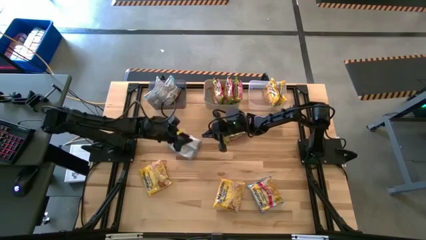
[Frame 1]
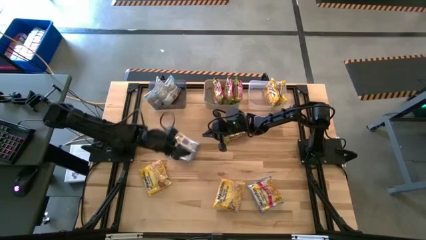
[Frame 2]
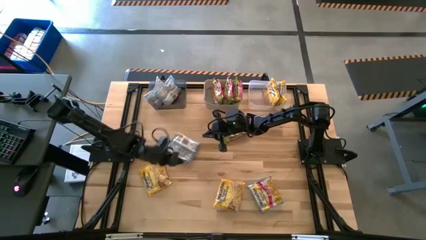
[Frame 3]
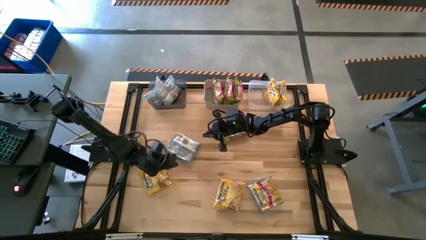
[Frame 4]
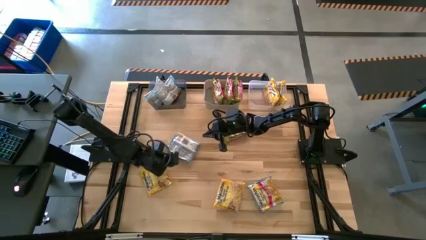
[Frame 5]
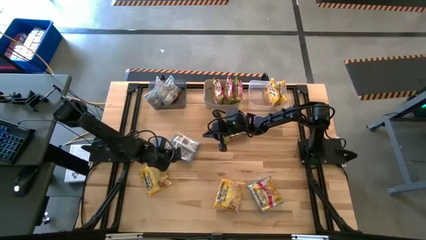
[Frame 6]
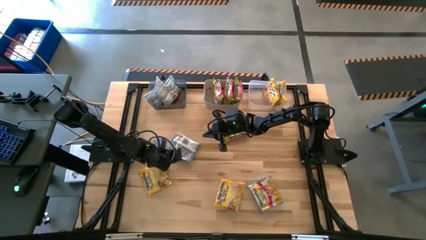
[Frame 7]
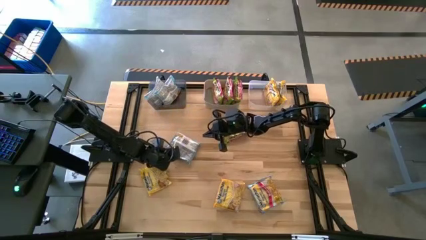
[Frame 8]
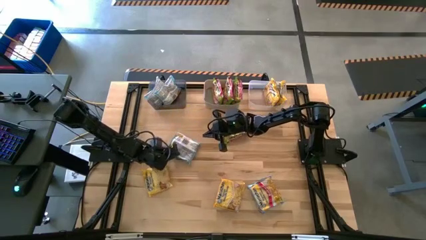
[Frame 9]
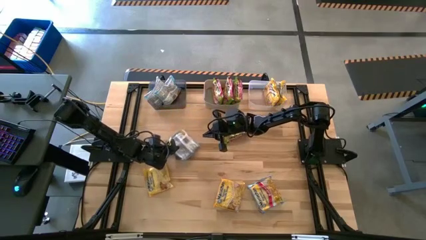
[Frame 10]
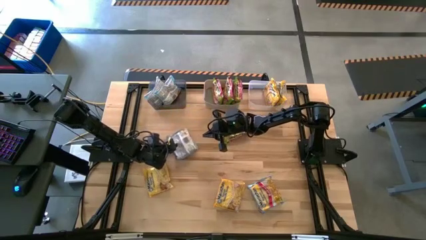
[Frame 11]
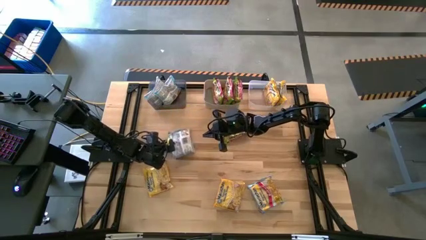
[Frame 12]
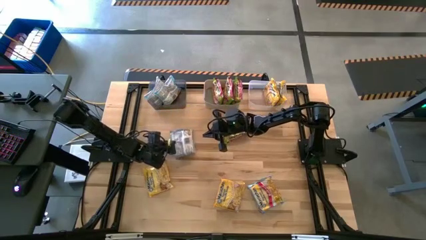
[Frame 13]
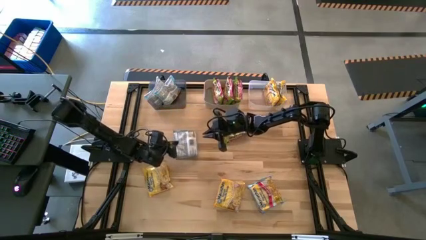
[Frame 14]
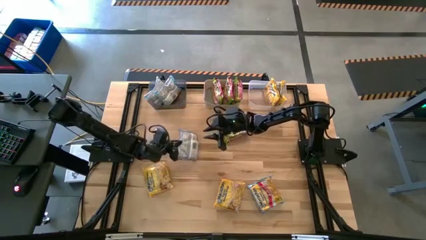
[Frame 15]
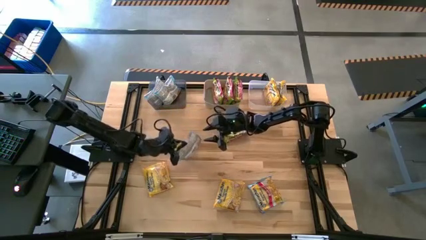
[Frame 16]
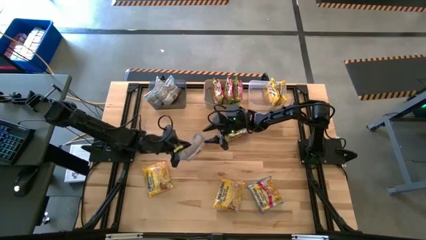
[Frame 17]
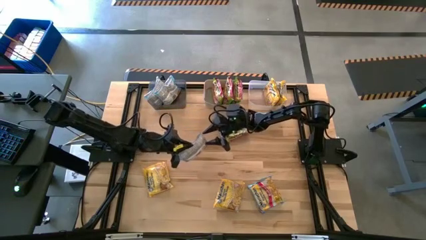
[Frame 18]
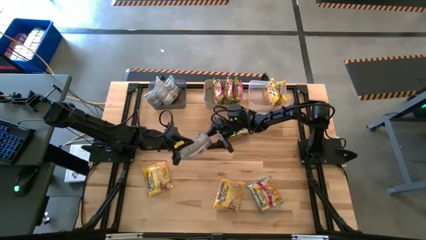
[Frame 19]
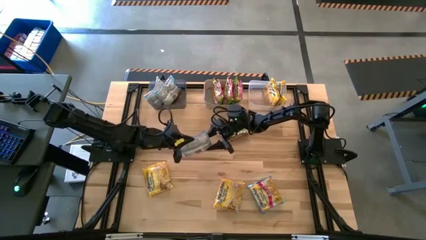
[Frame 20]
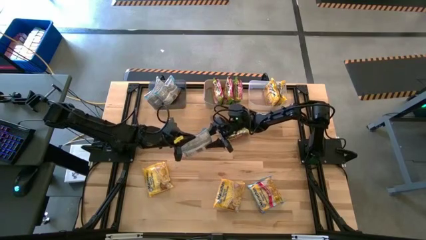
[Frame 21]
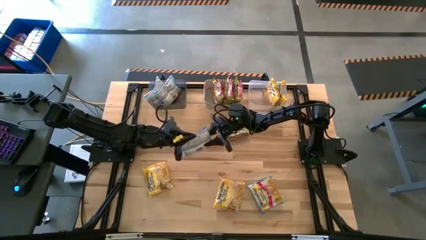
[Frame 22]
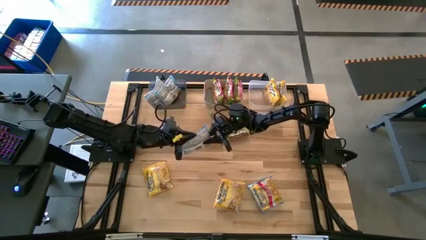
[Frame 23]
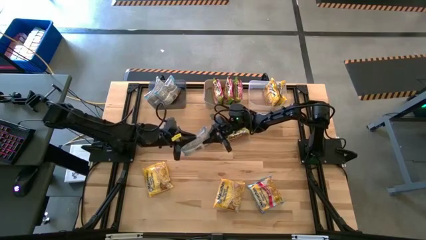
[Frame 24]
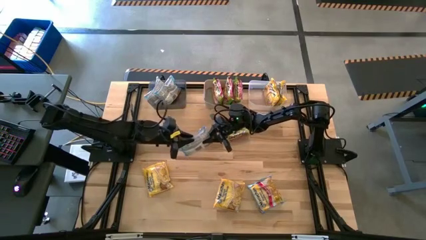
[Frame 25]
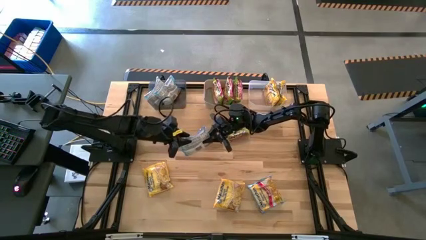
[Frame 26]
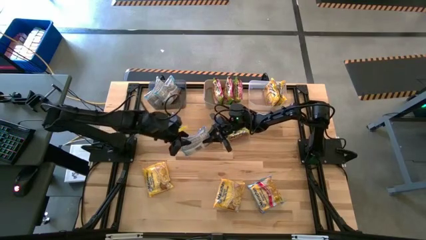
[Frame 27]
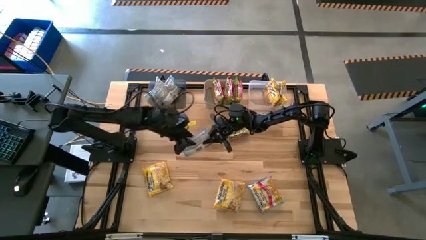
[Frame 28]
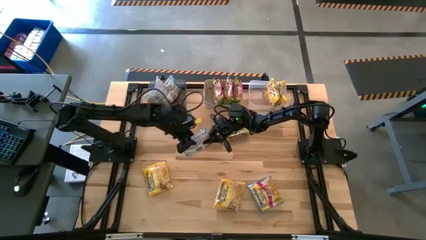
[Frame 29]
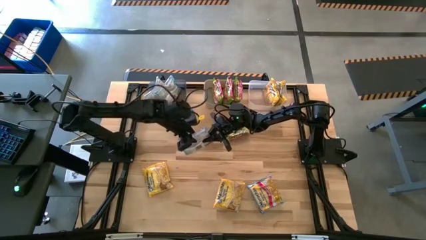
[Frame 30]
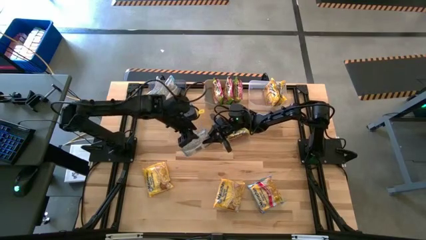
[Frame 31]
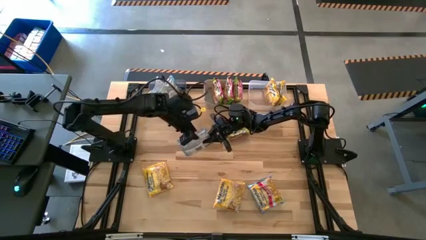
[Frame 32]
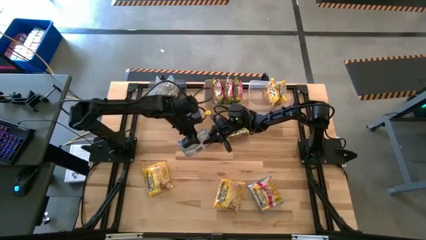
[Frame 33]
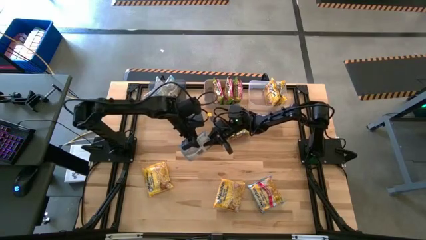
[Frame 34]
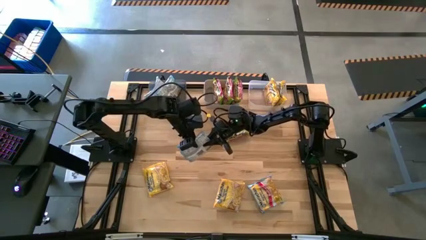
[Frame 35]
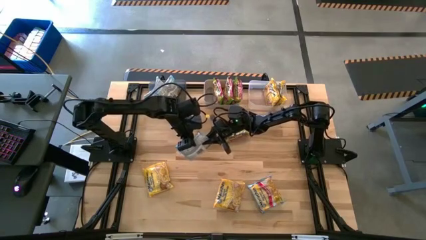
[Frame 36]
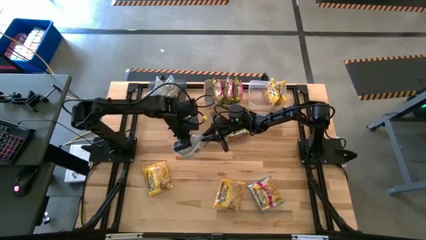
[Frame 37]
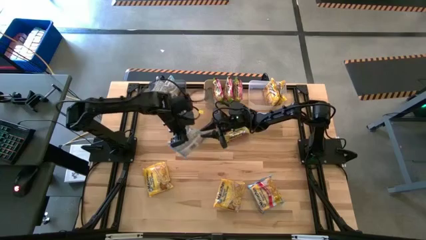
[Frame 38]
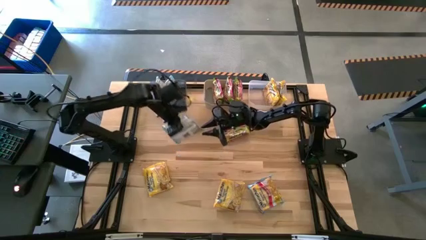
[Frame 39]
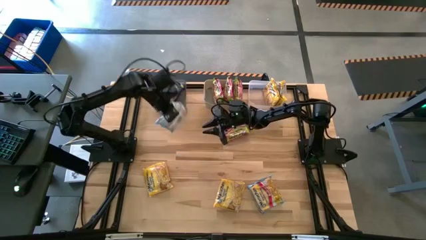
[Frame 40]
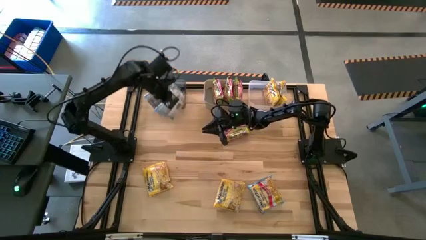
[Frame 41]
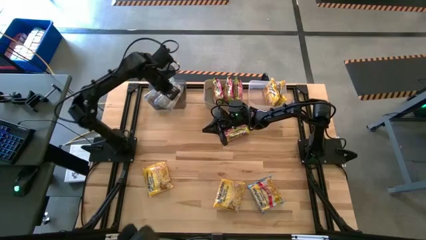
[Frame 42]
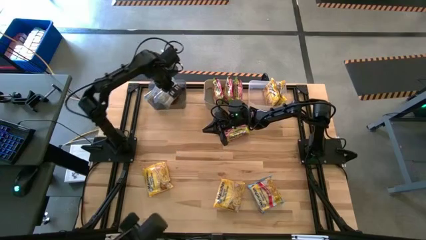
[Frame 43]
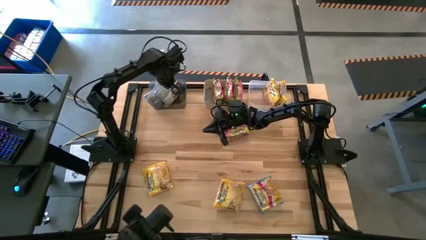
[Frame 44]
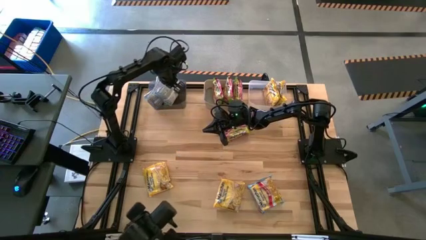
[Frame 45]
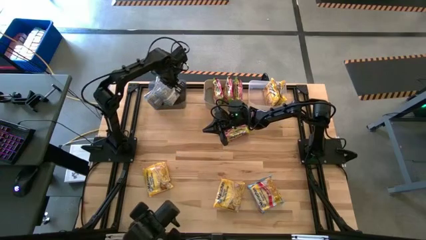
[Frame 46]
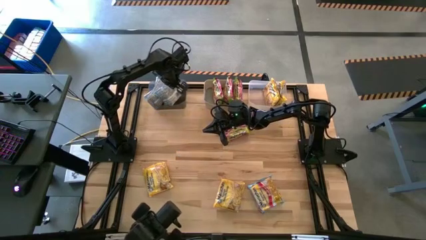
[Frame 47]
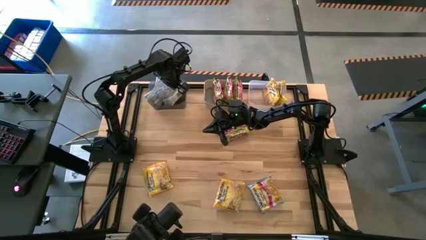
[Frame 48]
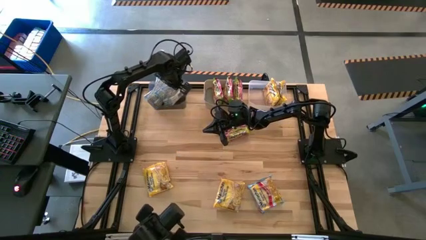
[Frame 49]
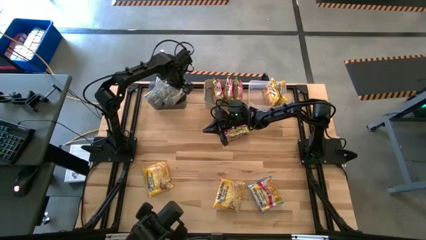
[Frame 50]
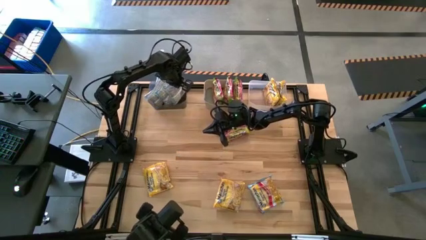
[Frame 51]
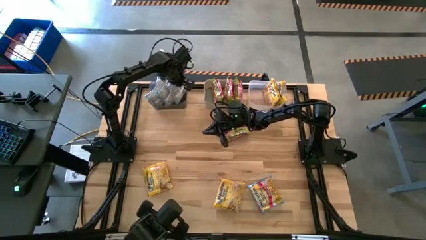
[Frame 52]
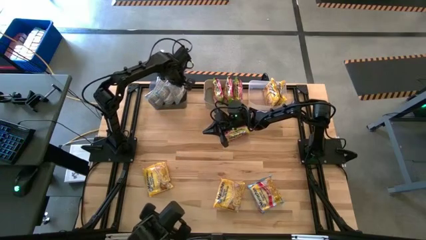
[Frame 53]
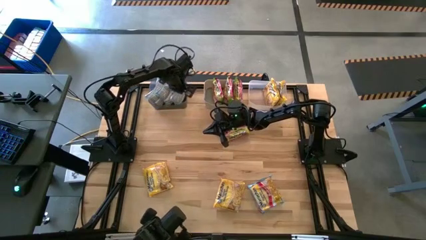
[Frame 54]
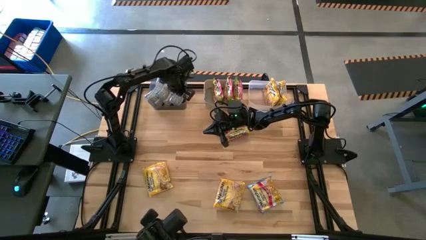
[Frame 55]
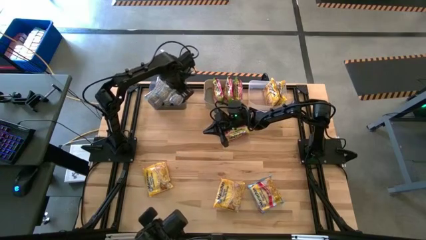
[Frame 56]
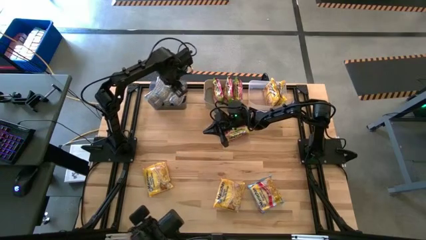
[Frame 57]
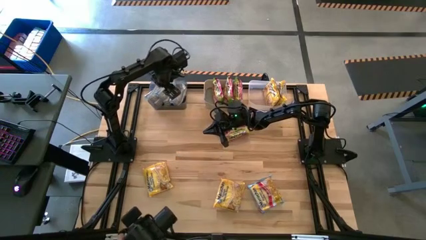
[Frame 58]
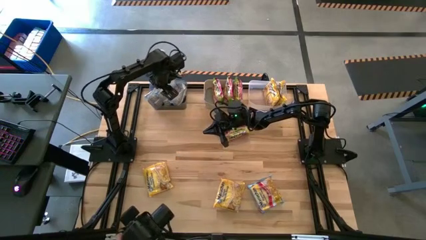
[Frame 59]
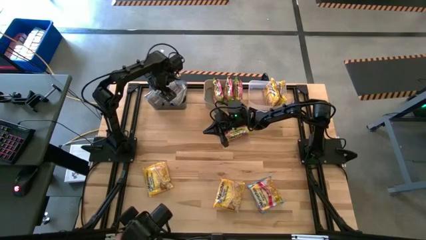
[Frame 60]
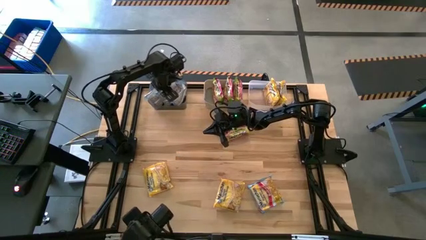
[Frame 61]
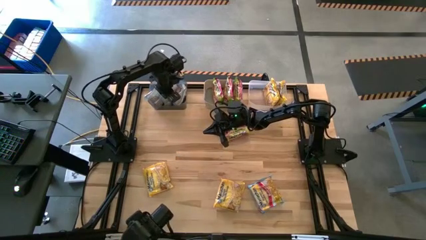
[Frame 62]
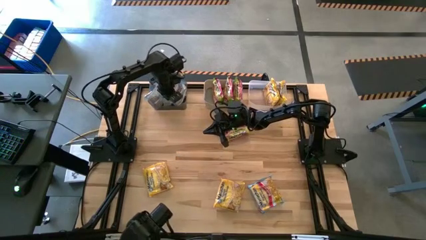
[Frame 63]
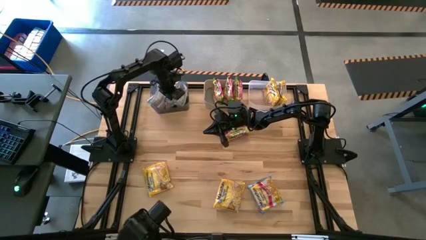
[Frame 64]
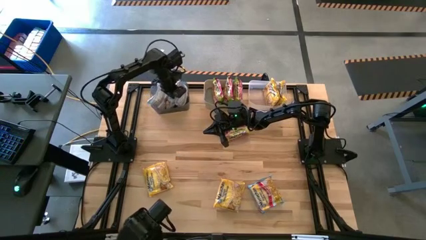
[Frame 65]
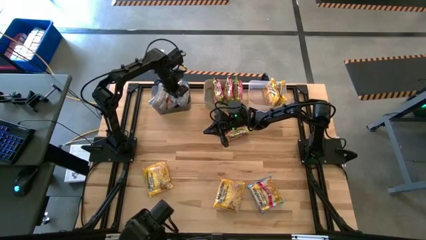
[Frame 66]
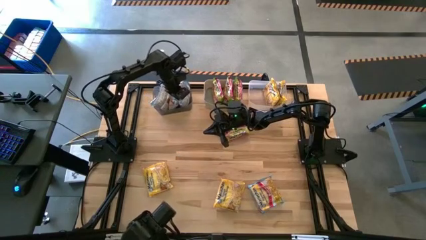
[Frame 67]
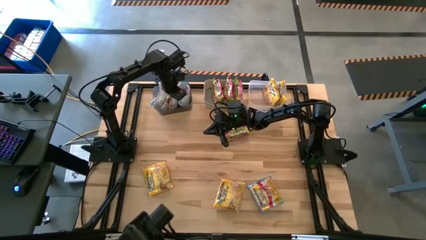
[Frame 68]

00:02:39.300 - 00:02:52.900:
Task: Sort Maruchan noodles
Put the top blue noodle pack into the black bin

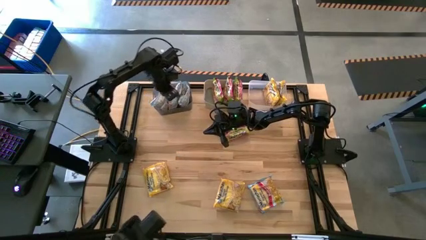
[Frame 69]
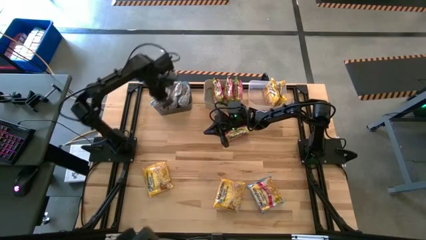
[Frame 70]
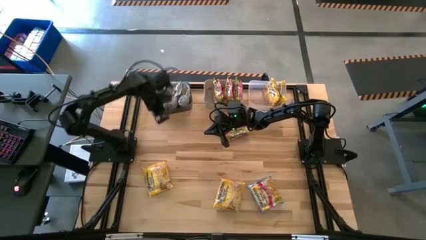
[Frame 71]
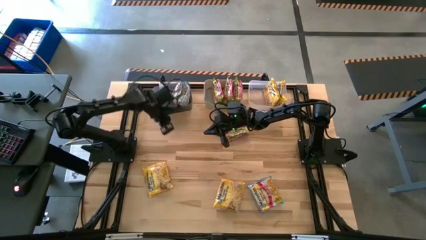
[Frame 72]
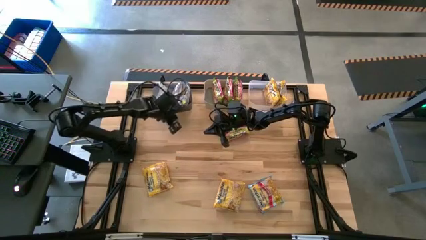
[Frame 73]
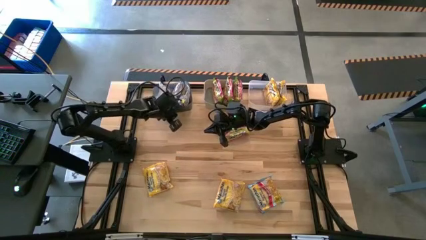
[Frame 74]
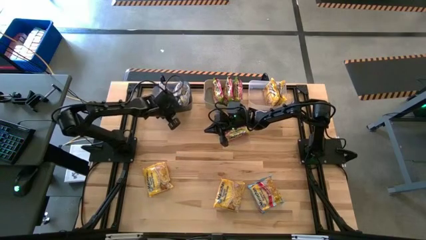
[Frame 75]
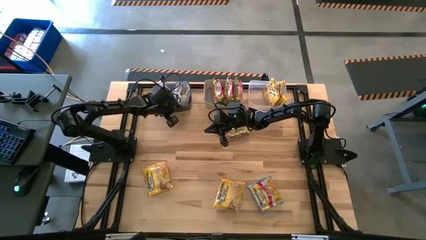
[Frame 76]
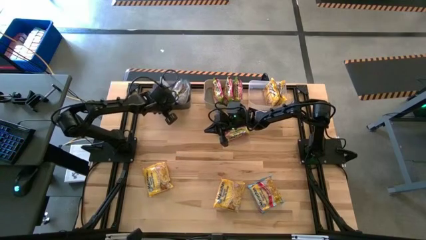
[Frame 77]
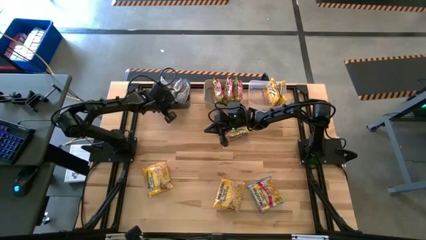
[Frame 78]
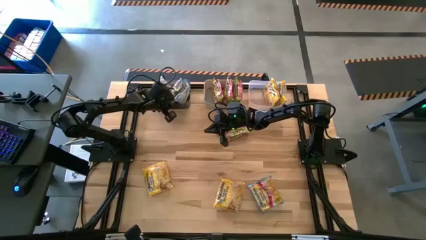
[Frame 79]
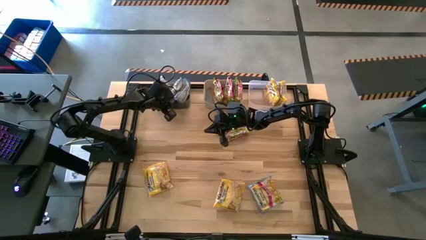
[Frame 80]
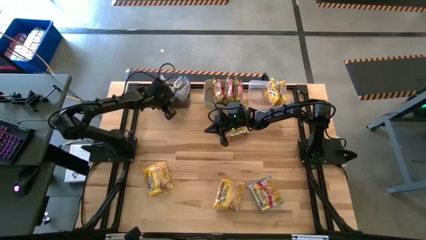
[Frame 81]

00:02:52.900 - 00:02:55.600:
Adjust the black bin on the table

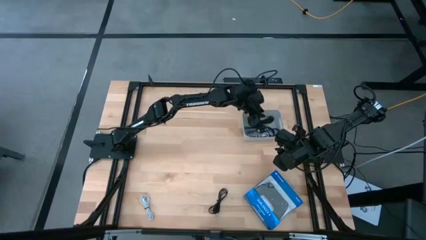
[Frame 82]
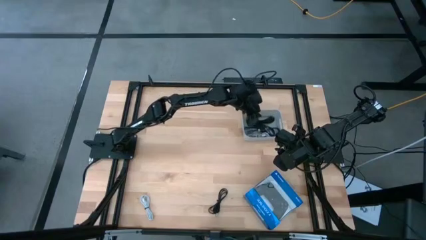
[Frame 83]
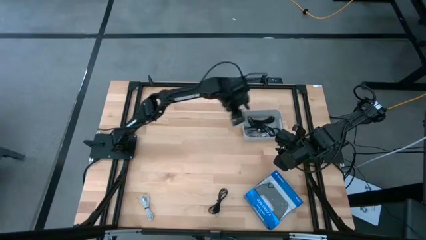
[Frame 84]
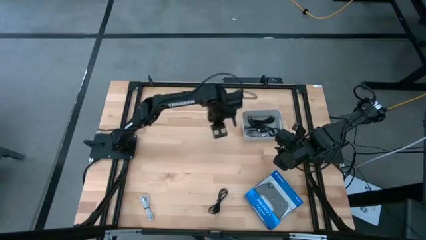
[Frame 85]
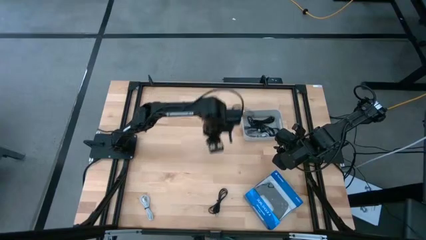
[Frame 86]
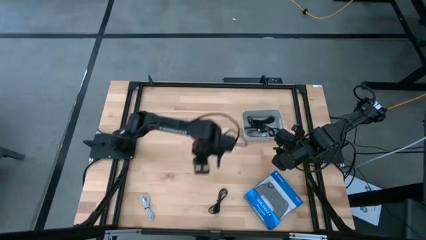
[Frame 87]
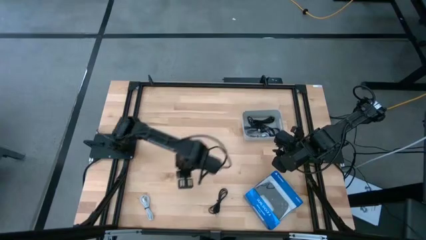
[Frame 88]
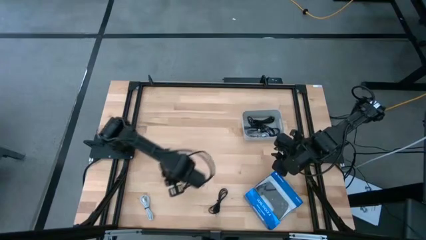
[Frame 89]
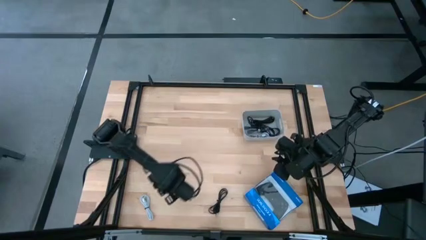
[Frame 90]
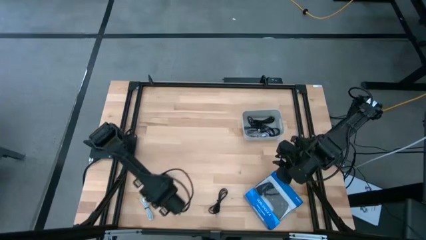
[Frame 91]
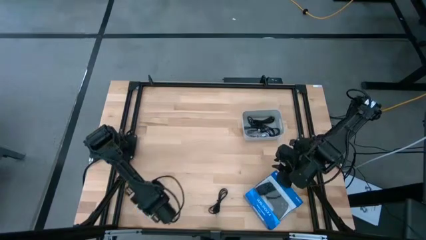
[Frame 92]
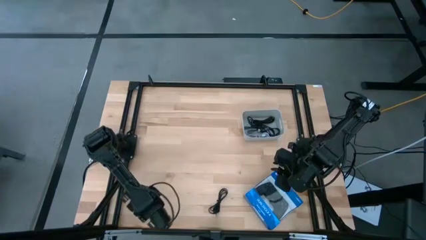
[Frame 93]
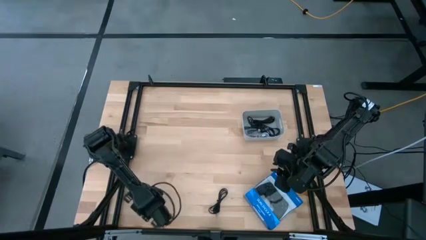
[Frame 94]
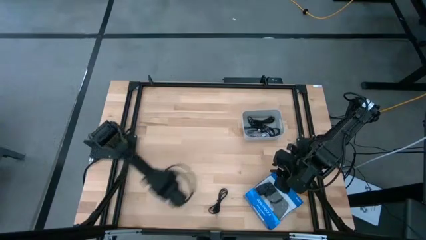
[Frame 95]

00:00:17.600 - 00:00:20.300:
Task: Pick and place USB-C Cables
Move the white USB cable to the center of the table
